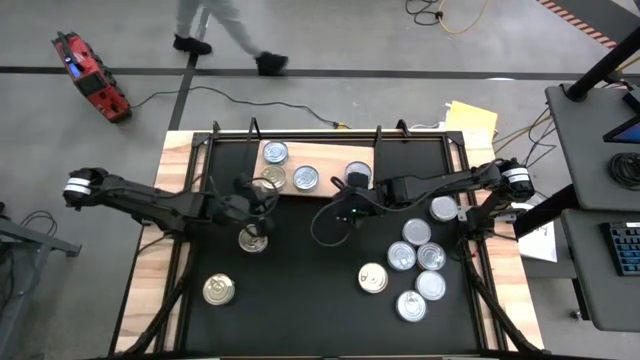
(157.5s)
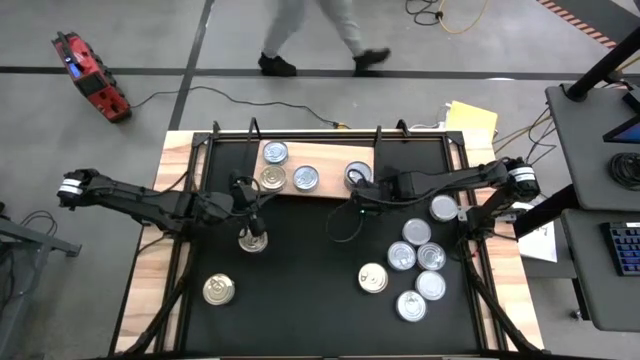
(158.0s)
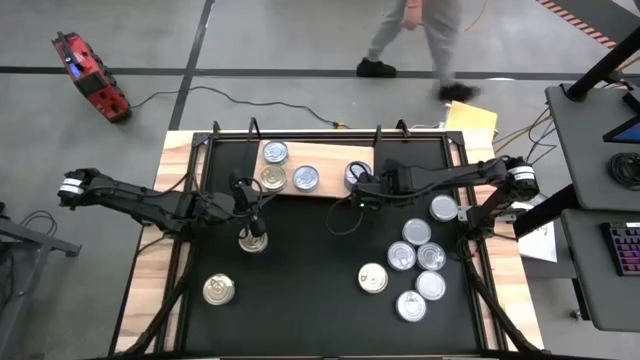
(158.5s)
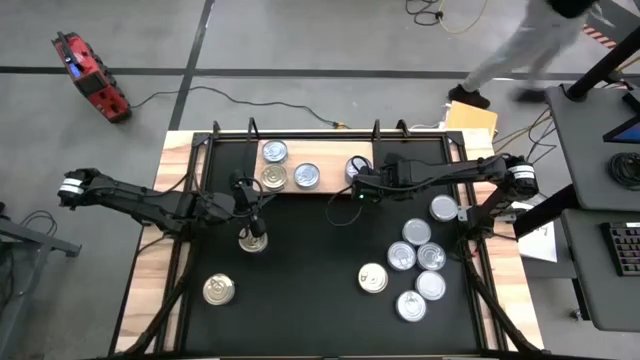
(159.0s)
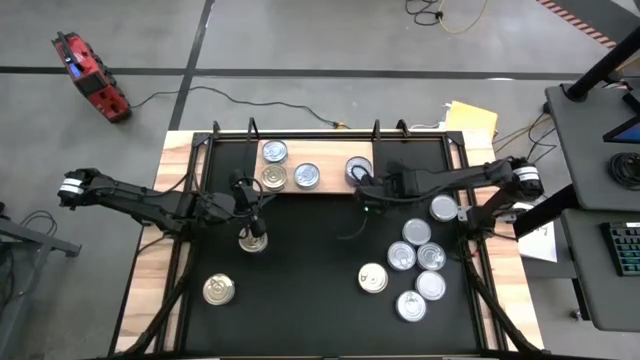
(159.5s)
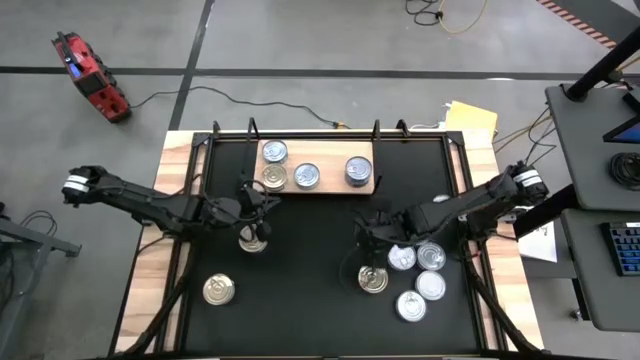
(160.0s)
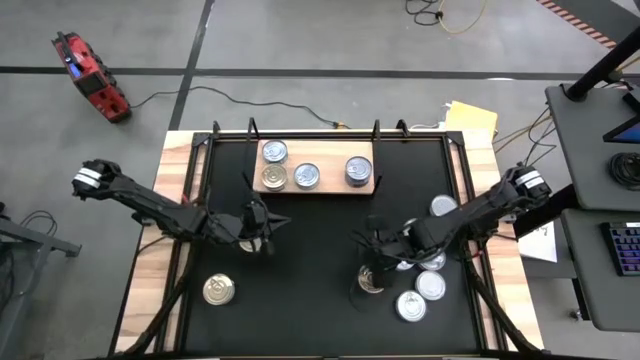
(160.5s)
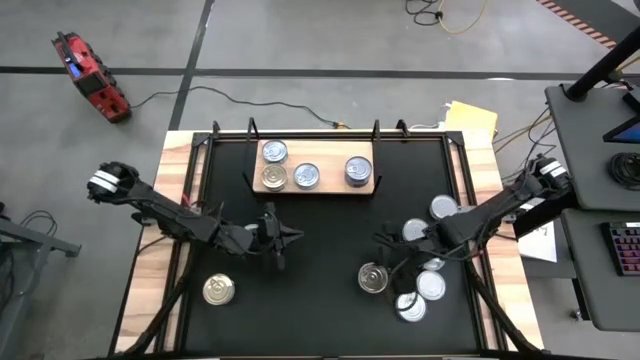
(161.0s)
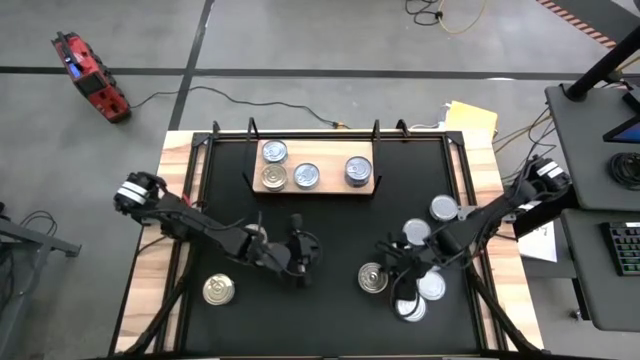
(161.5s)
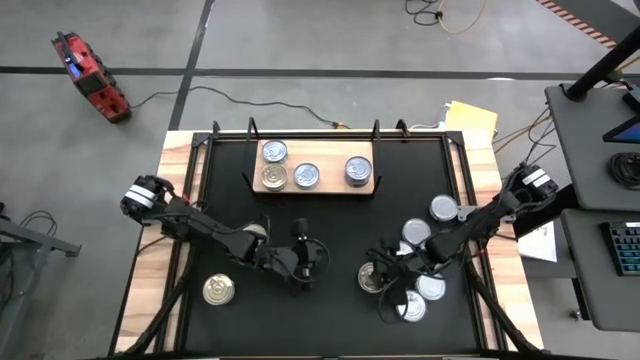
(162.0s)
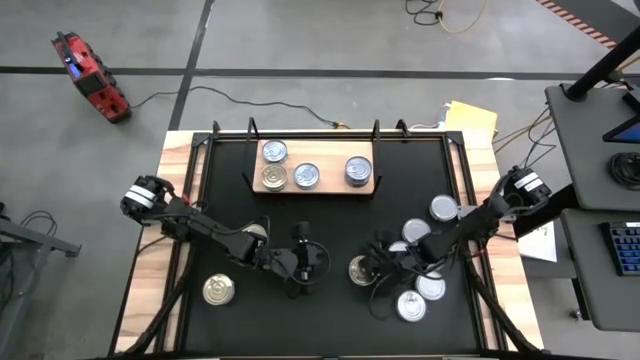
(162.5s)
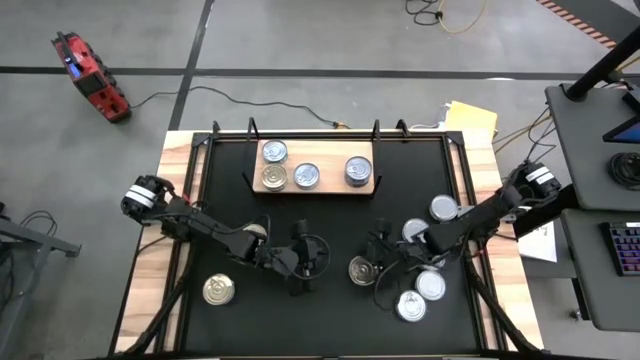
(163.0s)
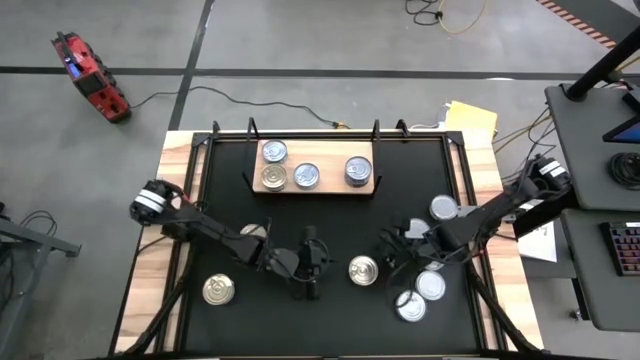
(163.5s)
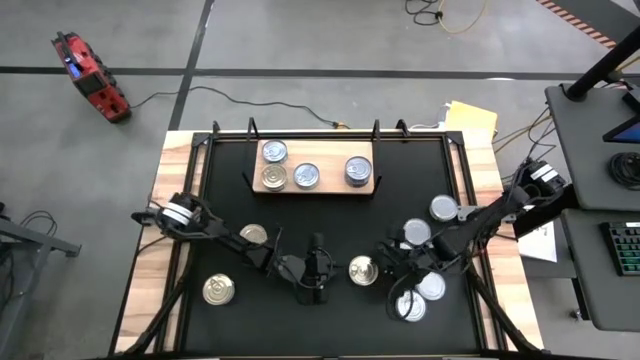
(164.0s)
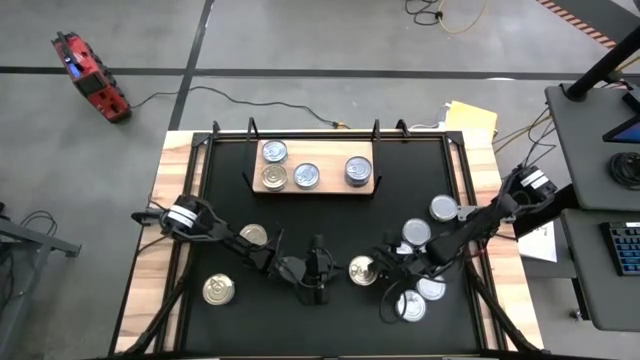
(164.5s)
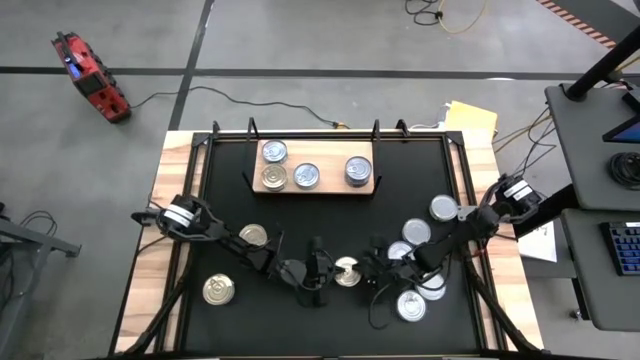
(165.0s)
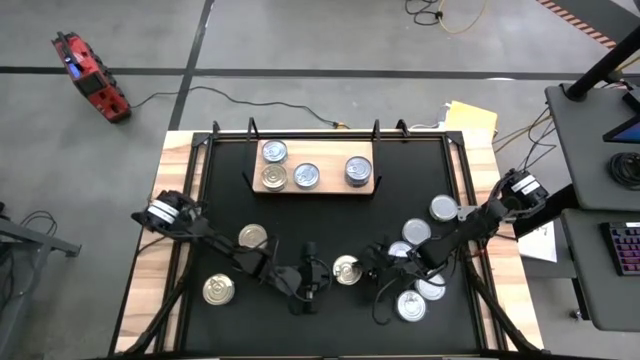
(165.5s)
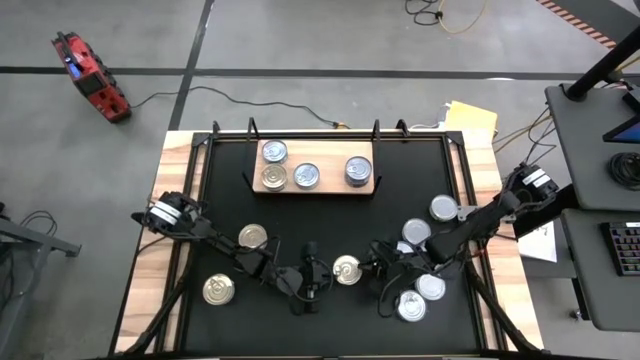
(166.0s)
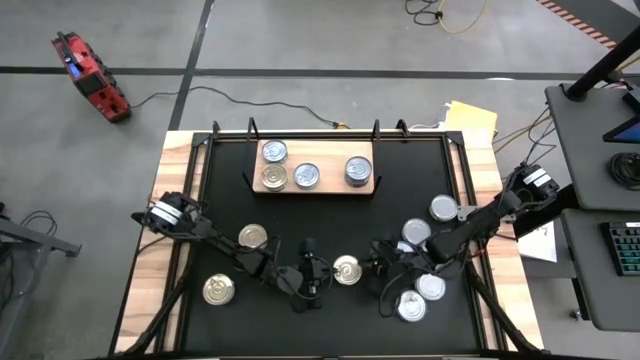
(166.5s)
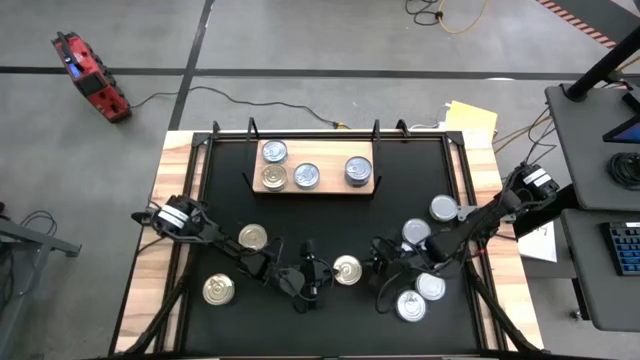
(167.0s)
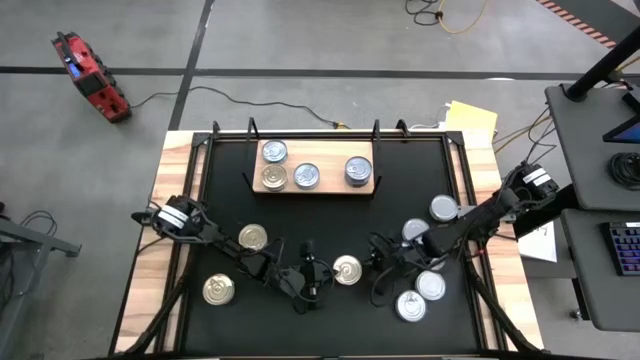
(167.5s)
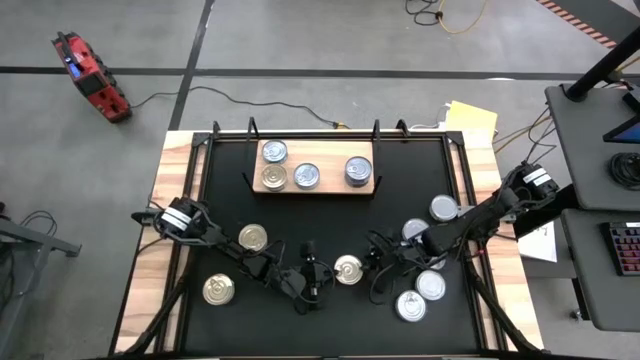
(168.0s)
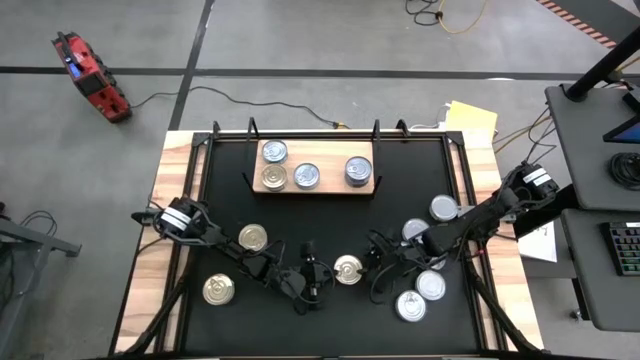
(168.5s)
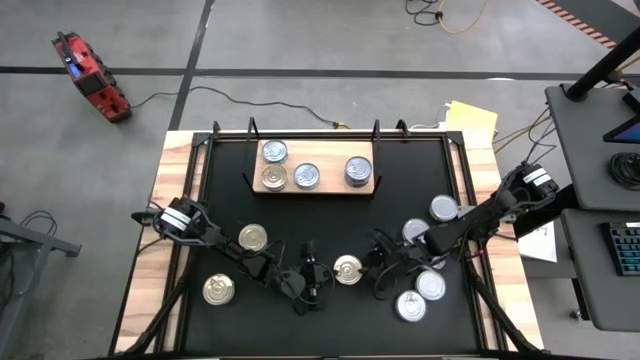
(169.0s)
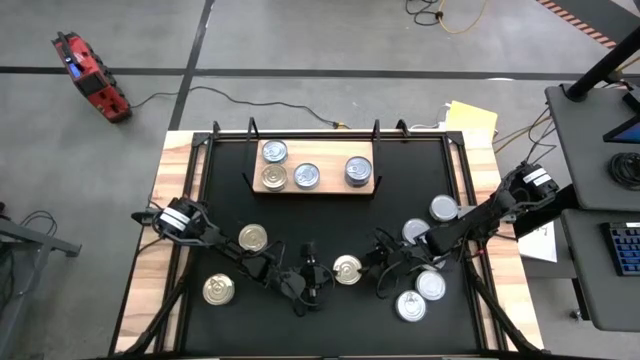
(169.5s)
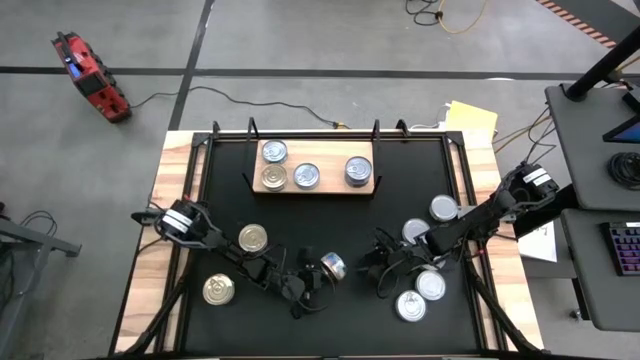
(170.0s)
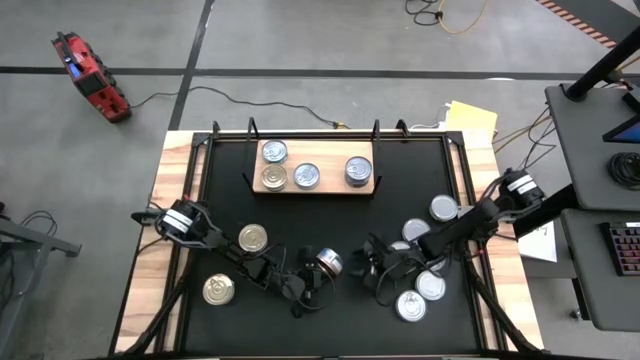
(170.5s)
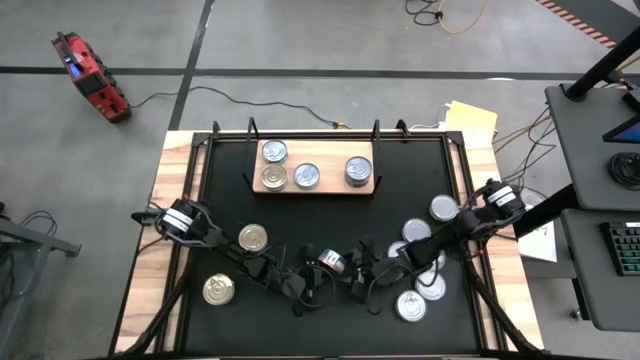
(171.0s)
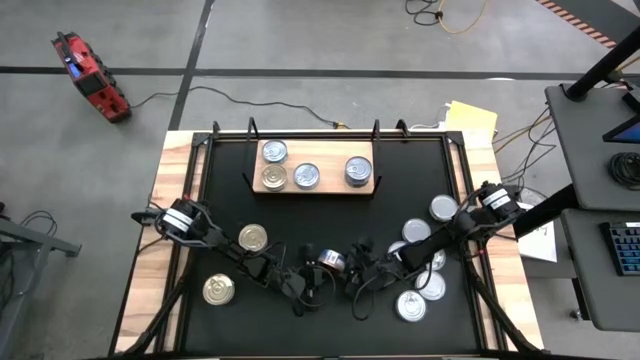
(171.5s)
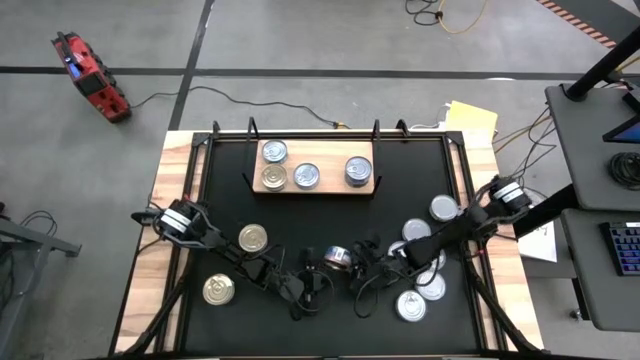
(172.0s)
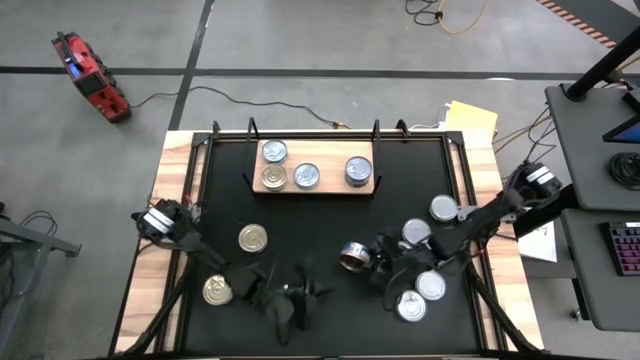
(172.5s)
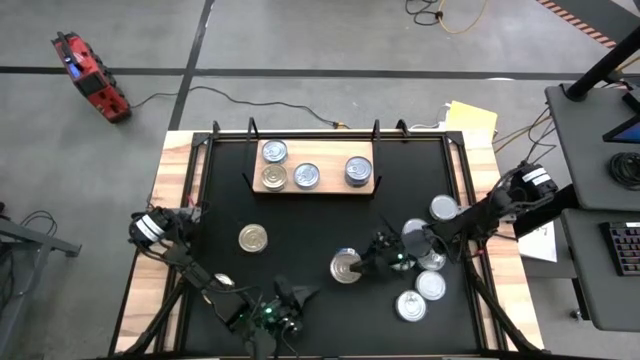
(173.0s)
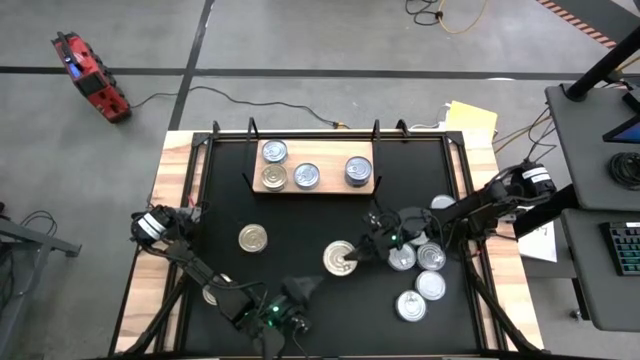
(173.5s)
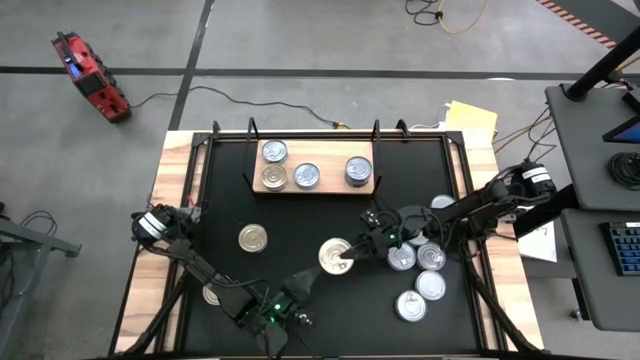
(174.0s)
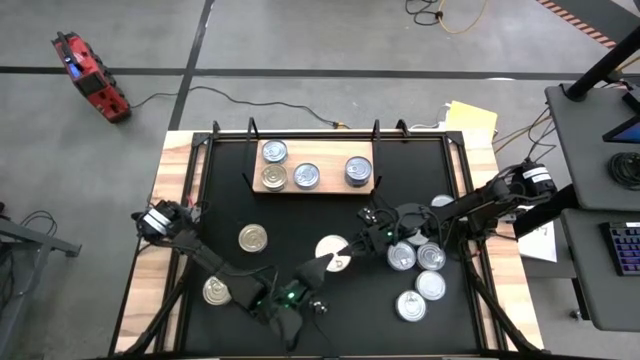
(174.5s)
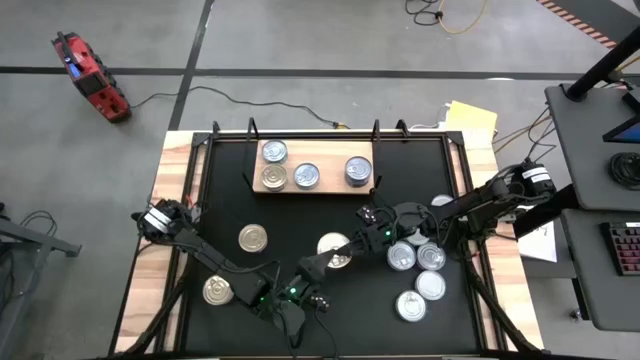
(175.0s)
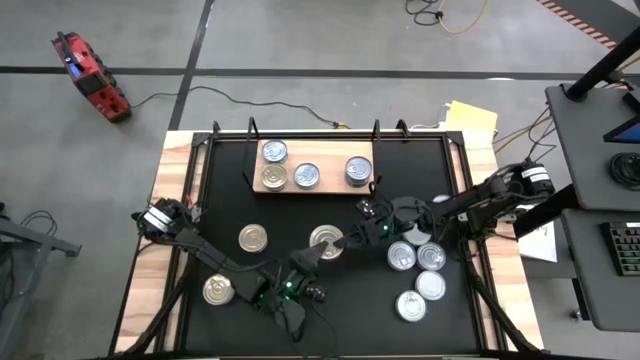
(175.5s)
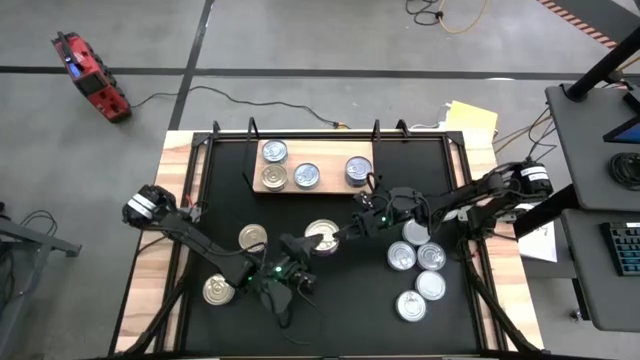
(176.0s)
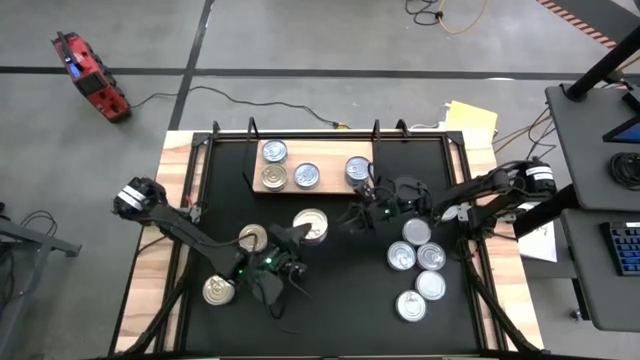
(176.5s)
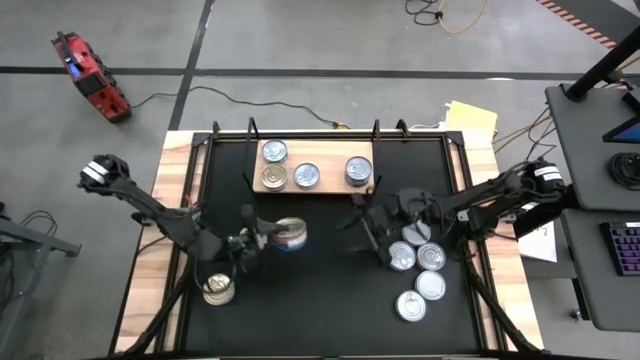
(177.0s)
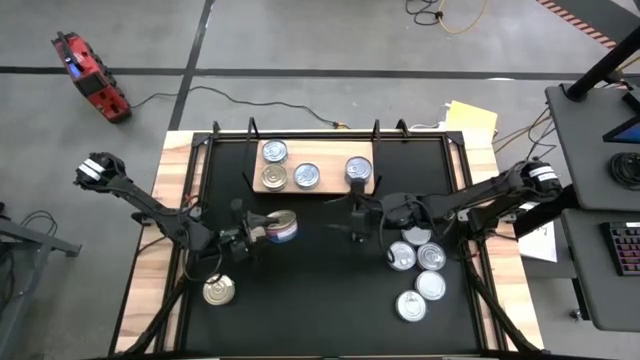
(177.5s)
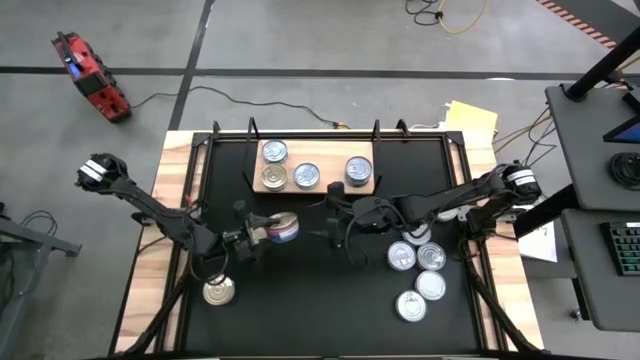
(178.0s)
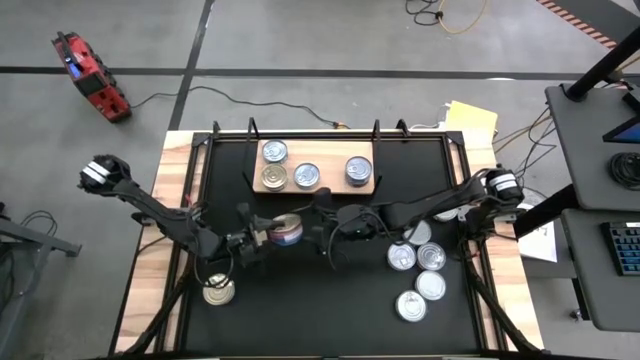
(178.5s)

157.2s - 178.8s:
Task: Stack canned seafood by type on shelf
Stack the blue tuna can on top of the other blue tuna can on the shelf
